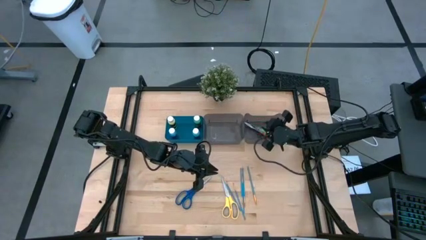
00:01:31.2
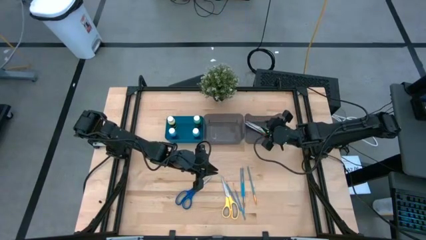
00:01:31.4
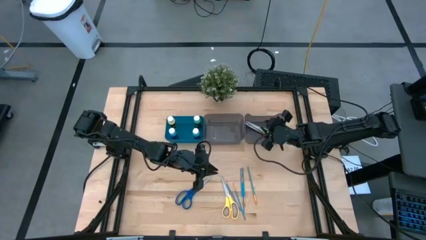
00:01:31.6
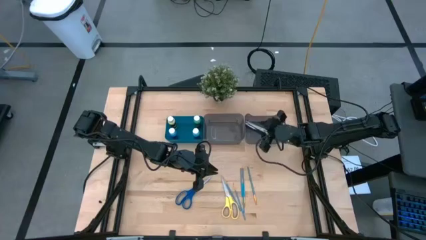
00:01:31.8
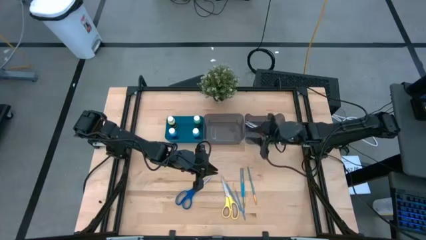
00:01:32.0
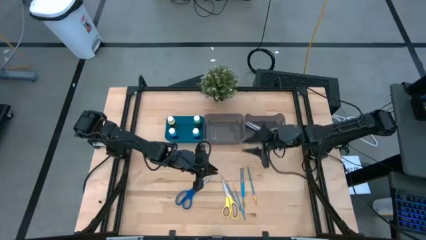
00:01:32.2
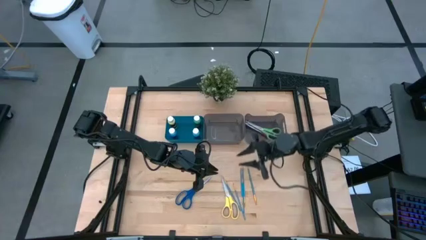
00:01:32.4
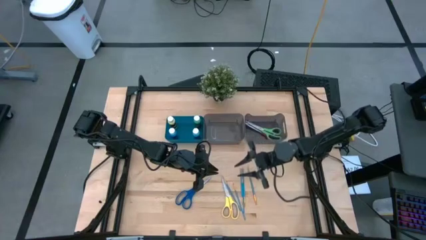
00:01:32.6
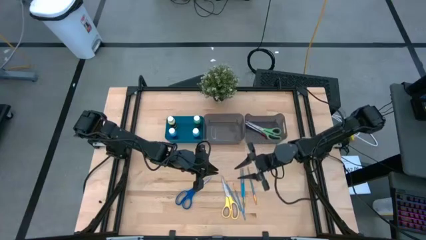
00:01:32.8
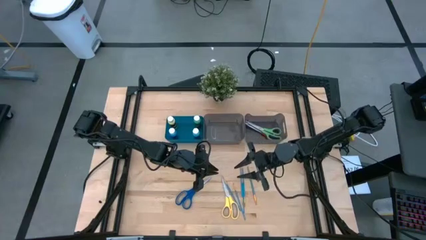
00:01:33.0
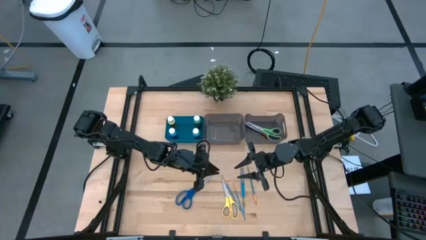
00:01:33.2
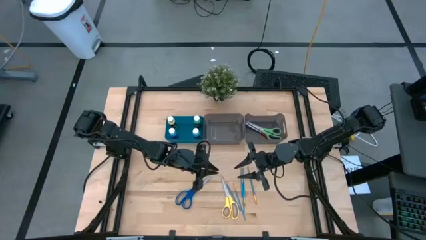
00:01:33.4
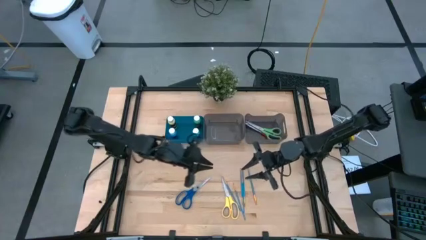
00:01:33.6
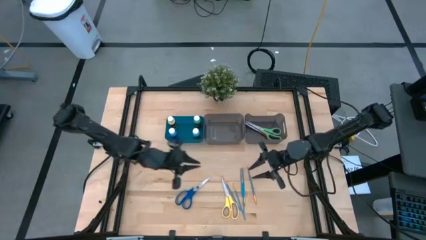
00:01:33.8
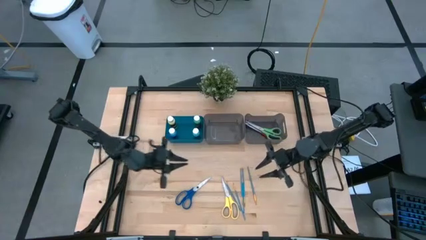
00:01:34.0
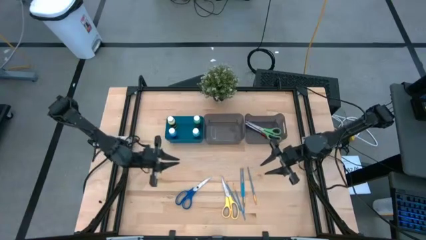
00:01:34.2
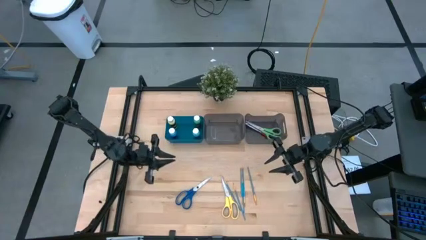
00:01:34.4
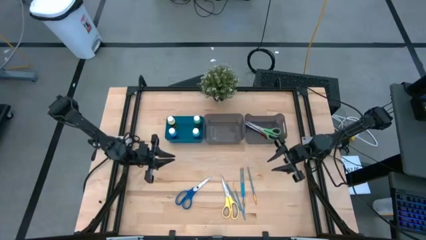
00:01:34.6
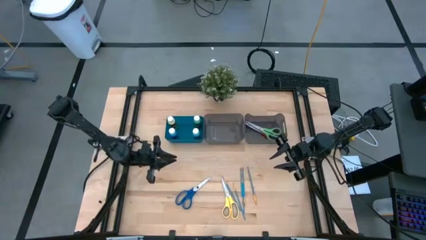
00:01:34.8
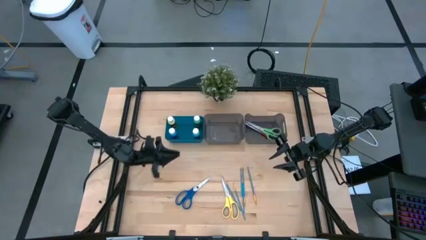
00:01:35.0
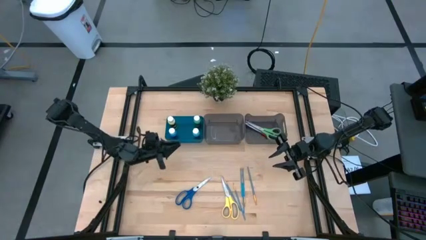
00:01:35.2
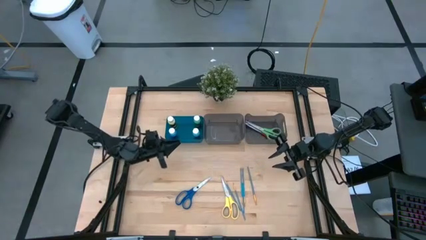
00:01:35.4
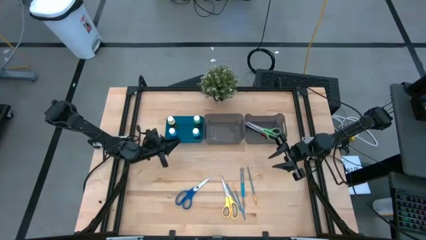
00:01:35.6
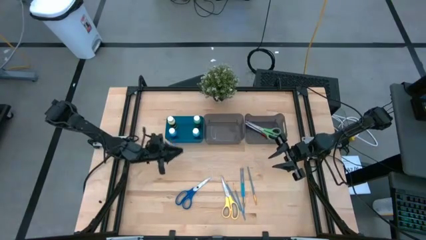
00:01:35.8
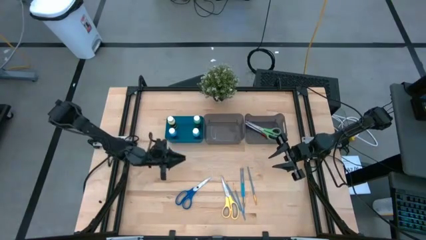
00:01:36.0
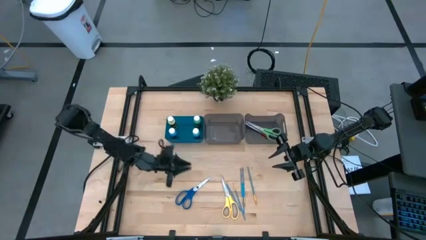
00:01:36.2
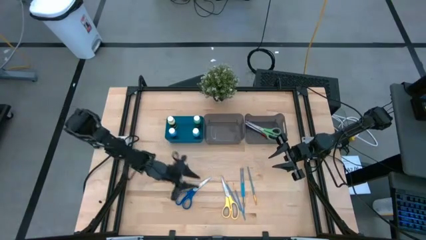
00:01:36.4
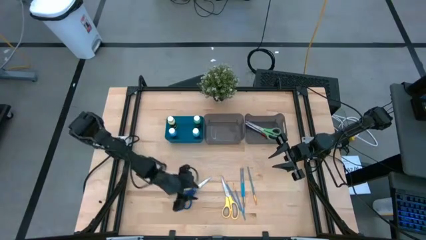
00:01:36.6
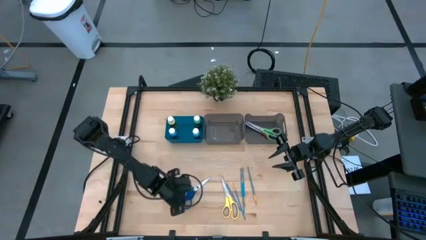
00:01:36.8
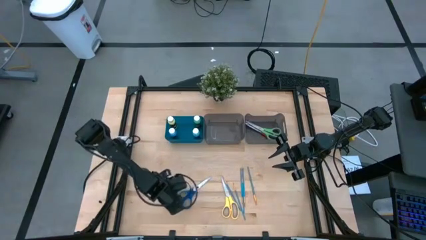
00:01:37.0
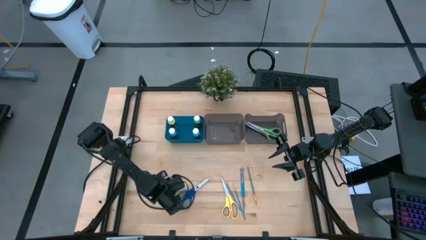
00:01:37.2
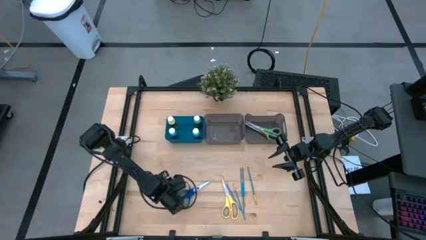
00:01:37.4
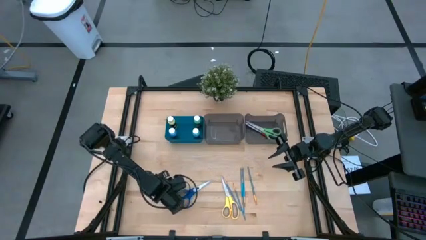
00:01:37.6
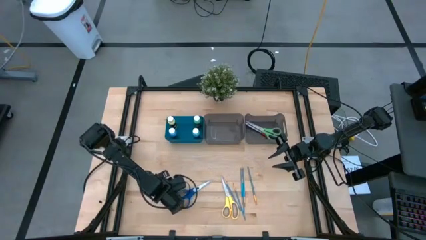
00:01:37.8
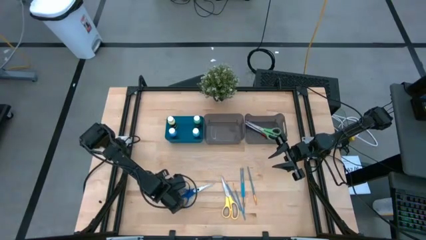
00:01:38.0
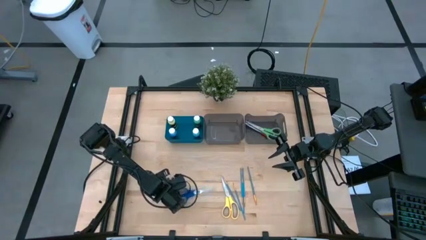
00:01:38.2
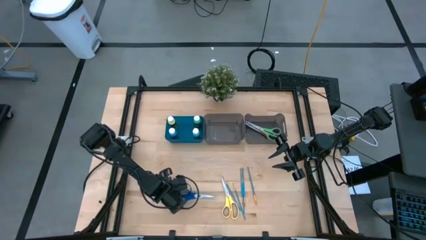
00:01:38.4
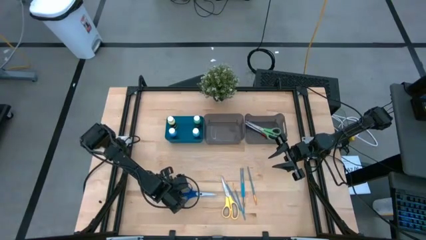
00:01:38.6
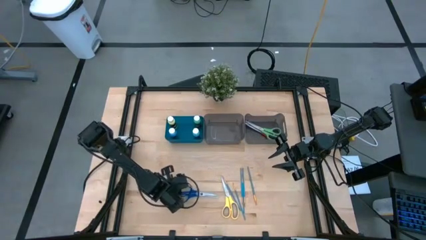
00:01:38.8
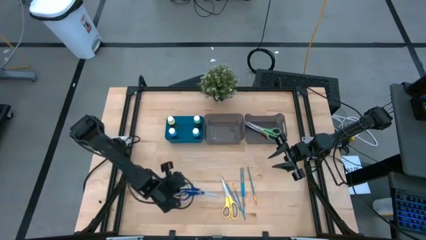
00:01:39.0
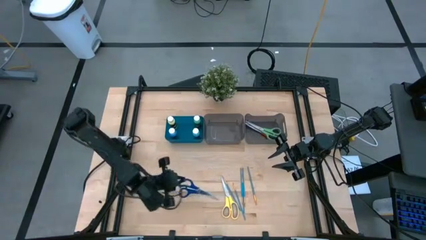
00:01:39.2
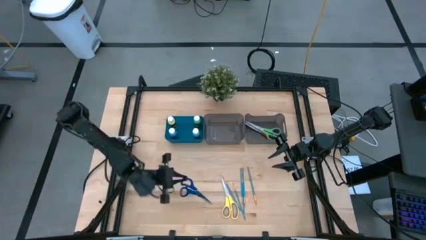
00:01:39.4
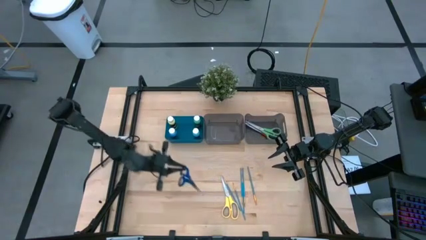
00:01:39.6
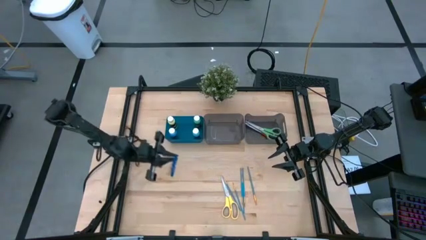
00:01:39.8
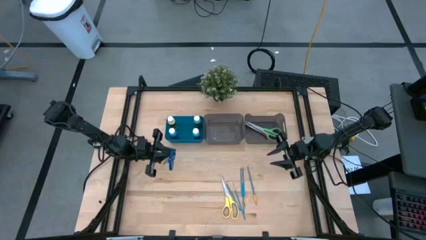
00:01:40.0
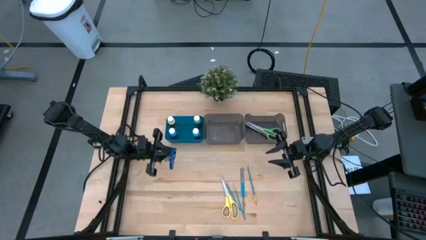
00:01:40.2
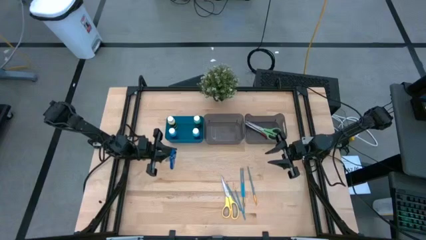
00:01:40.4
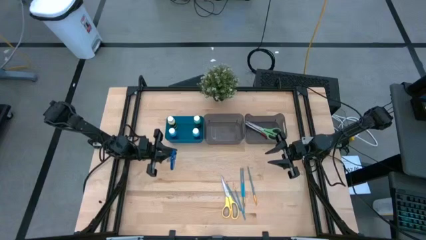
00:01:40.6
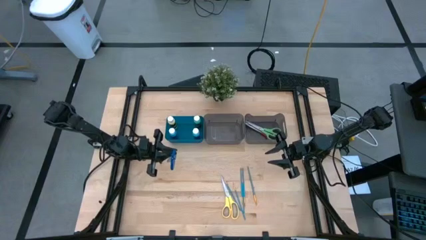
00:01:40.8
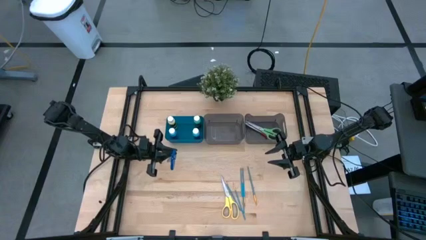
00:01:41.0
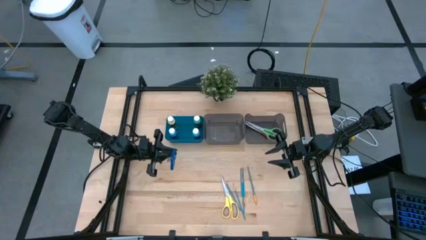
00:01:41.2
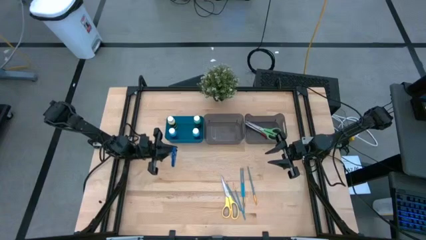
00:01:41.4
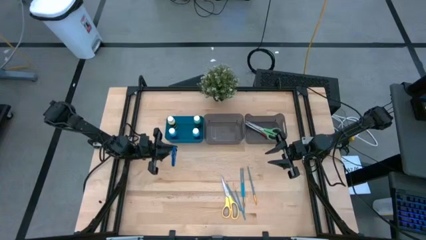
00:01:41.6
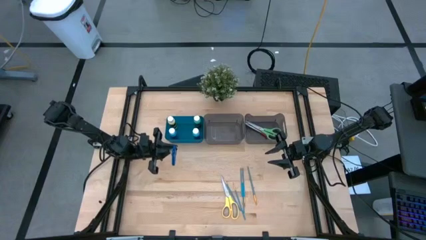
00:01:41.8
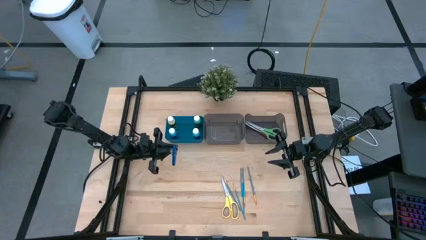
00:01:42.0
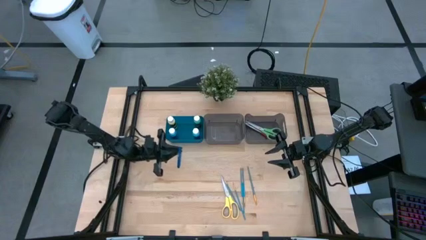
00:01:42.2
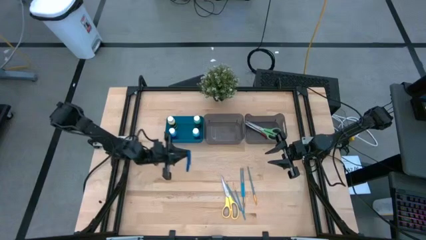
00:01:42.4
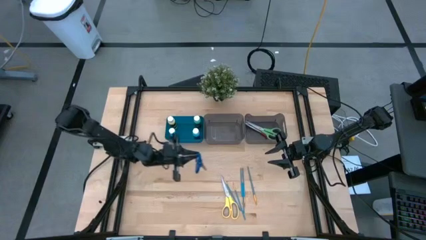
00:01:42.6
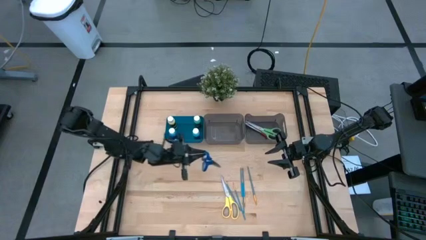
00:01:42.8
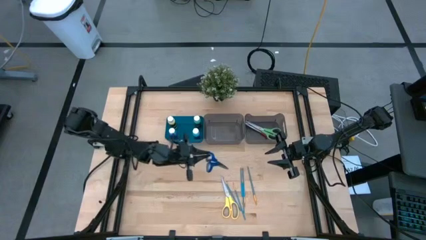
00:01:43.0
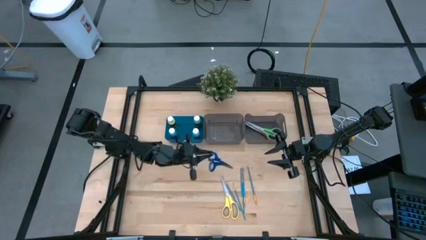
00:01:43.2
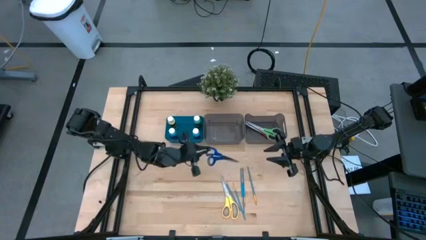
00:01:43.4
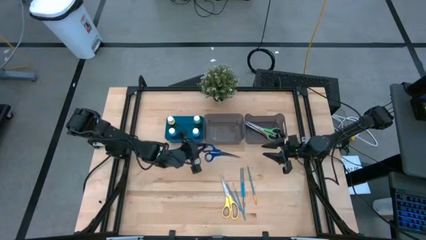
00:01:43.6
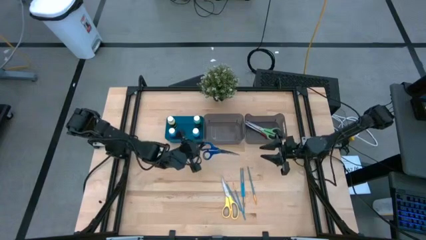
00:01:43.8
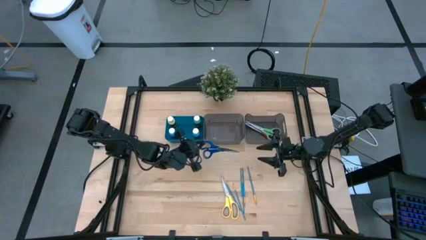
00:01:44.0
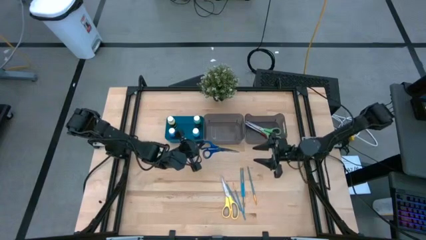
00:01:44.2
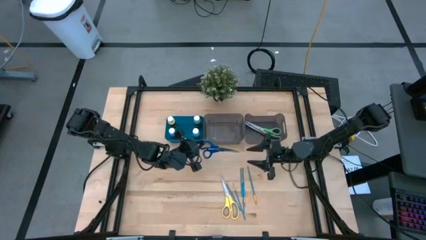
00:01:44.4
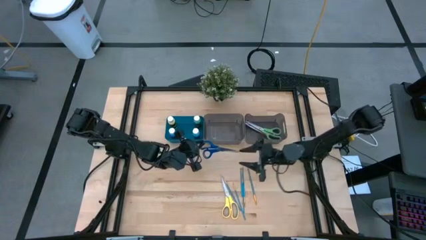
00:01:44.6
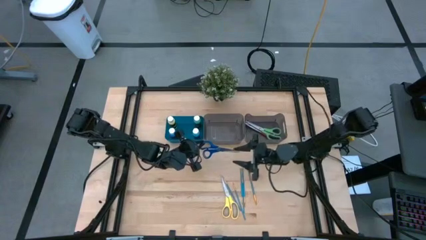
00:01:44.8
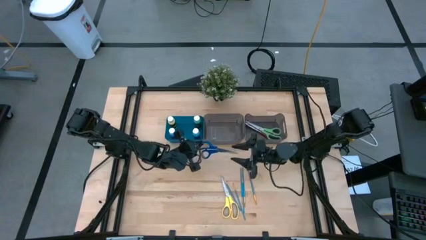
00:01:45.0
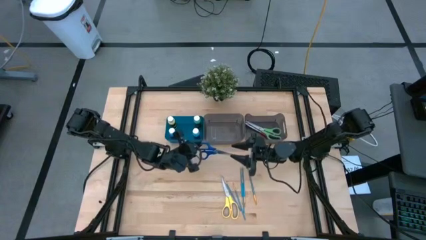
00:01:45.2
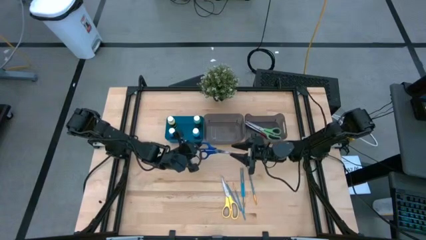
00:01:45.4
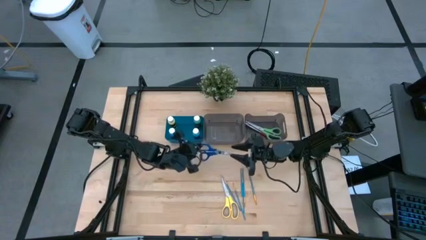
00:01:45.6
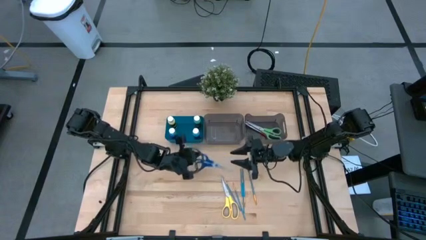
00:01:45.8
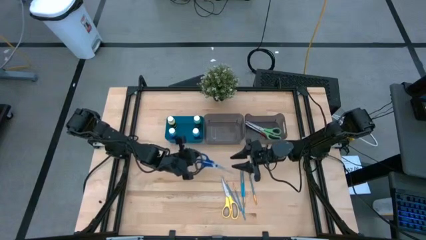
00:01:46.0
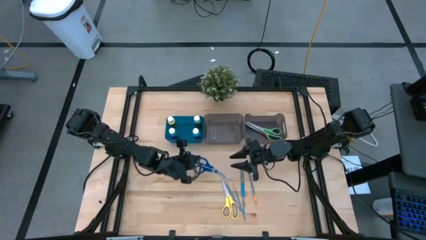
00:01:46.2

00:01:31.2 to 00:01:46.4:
Task: Pick & Place Paint Supplies
Put the blue scissor into the right black bin
